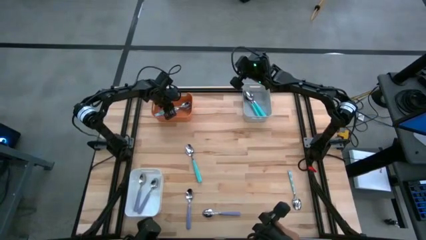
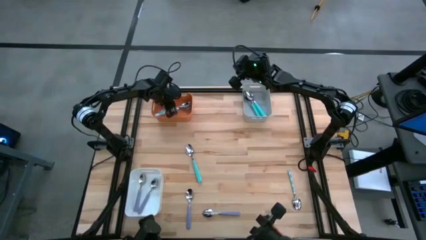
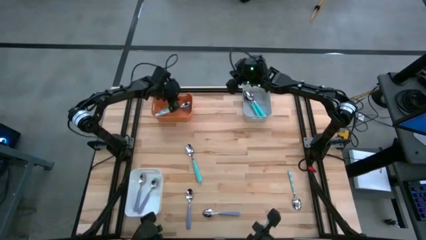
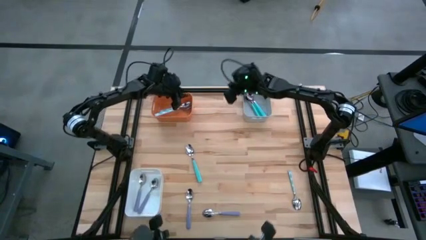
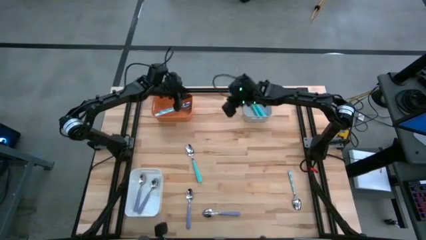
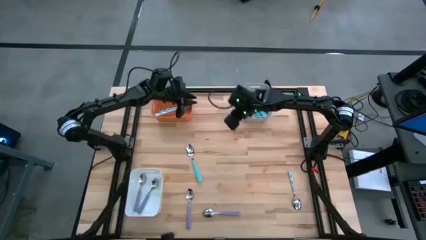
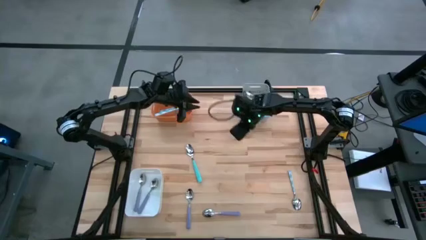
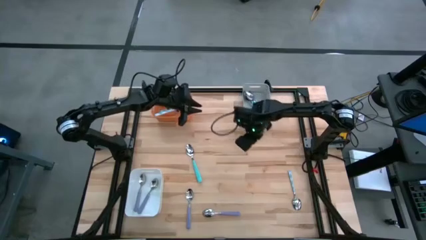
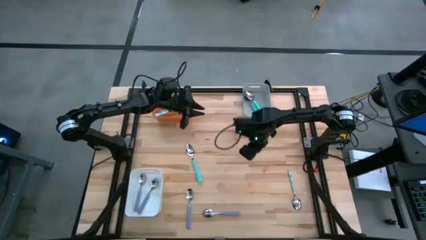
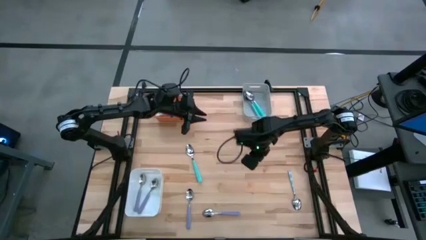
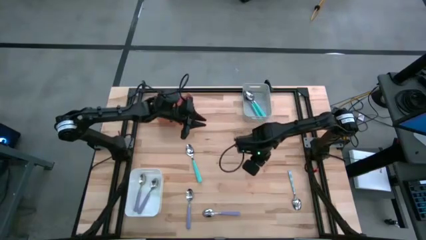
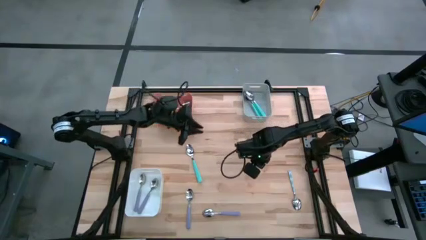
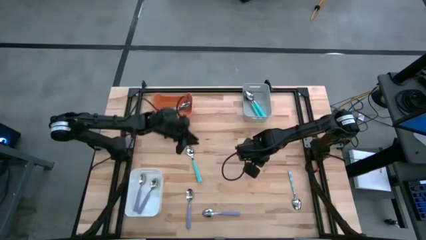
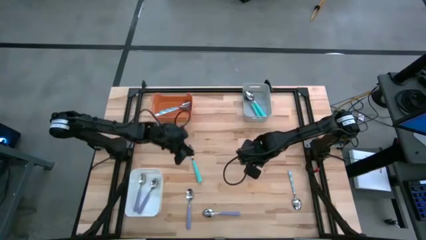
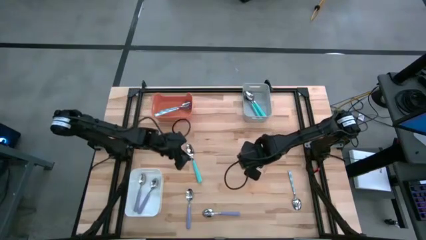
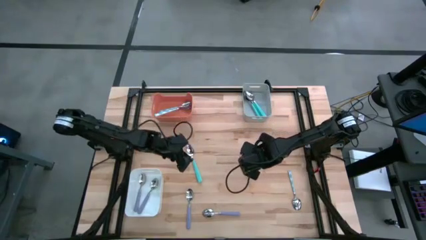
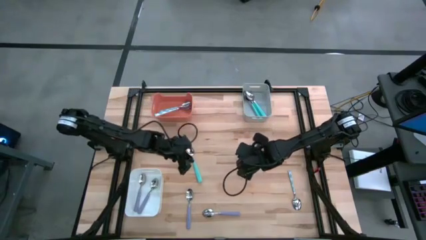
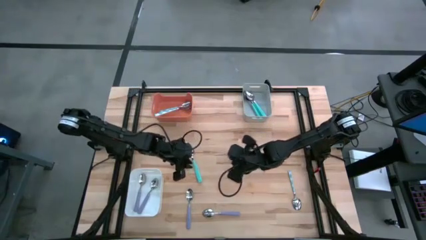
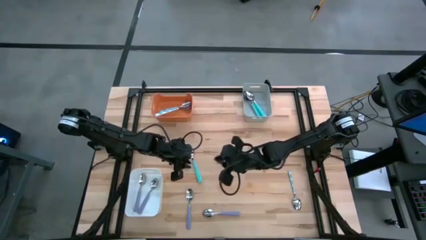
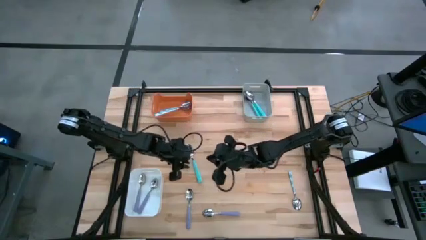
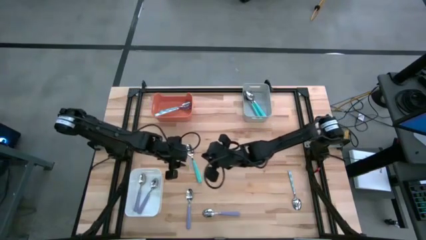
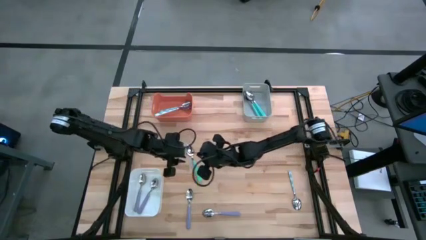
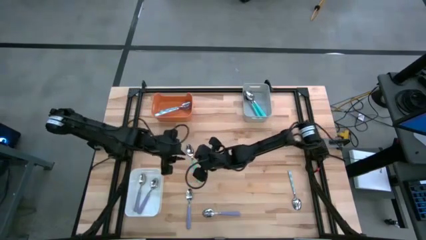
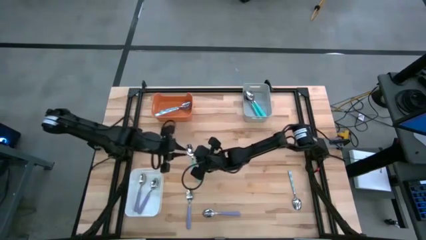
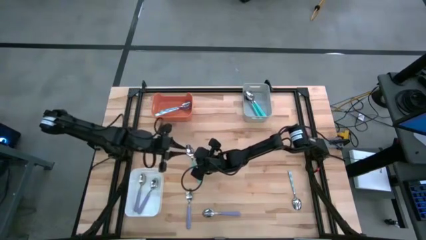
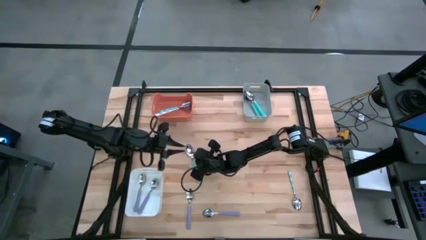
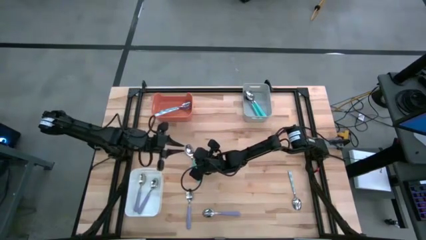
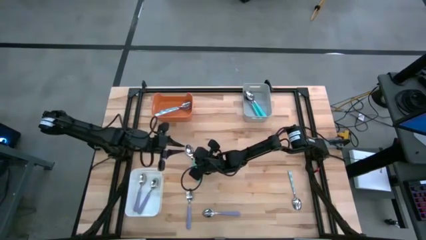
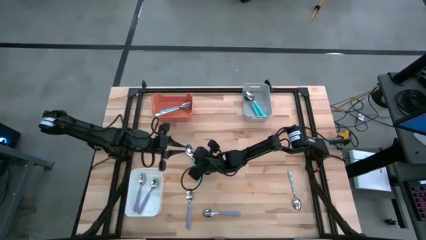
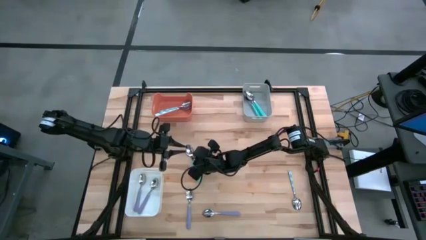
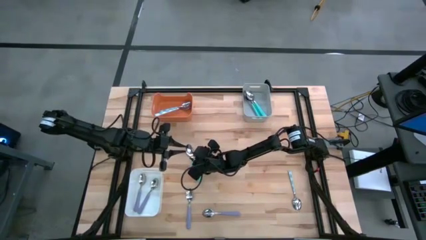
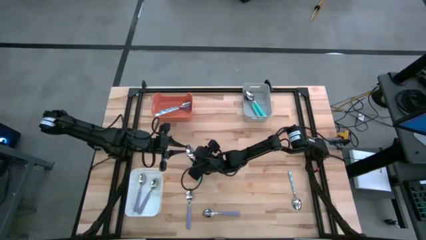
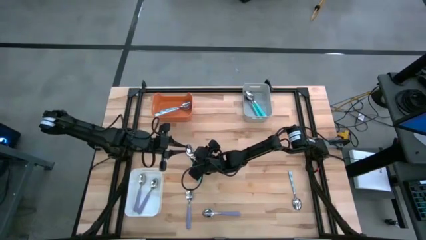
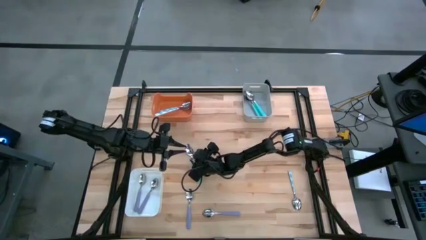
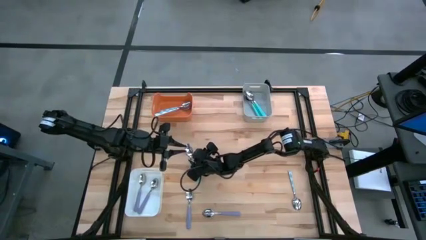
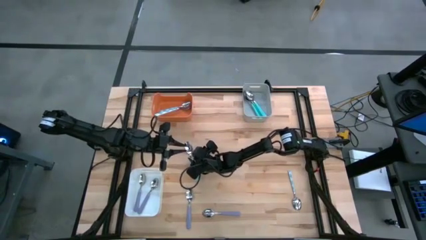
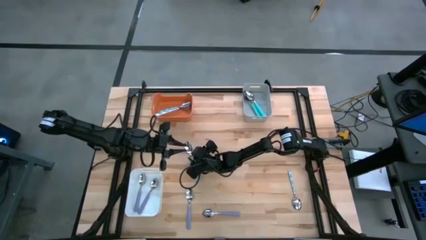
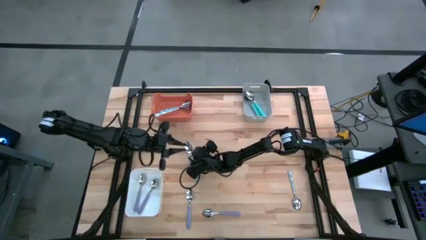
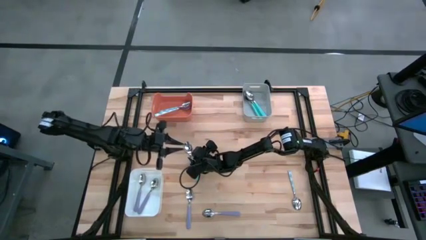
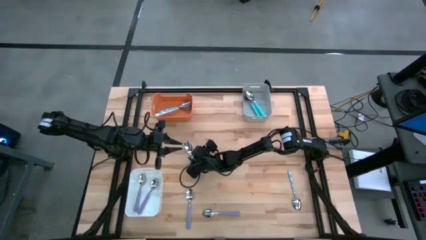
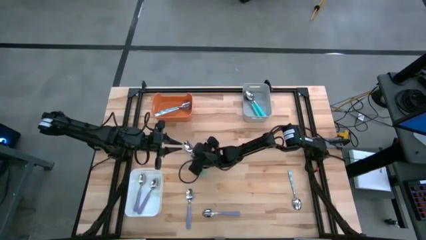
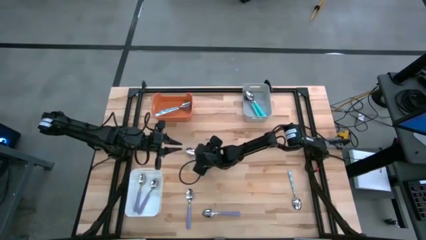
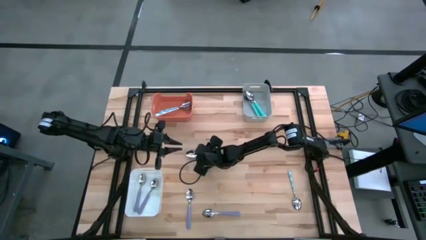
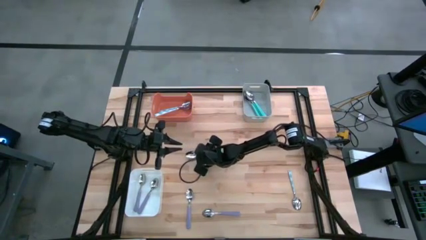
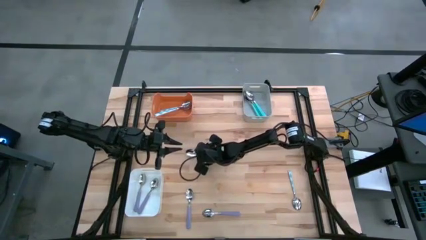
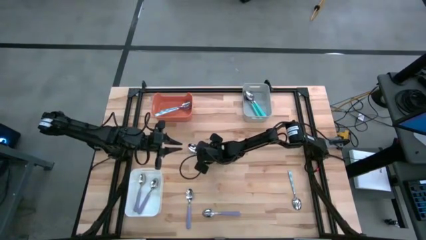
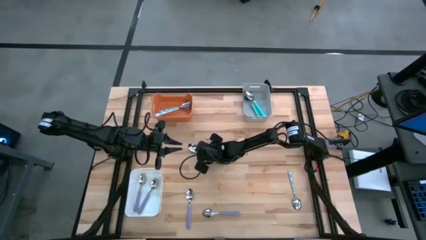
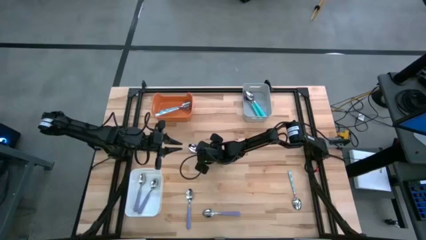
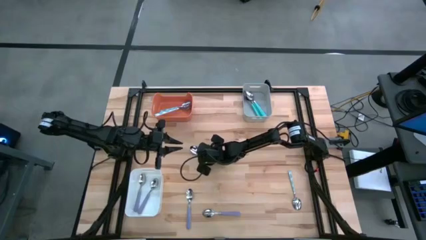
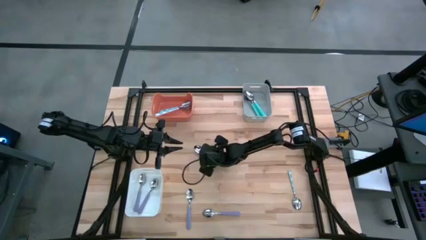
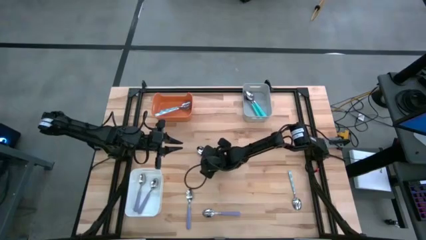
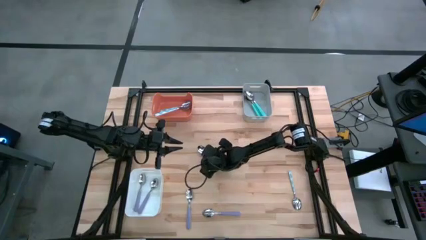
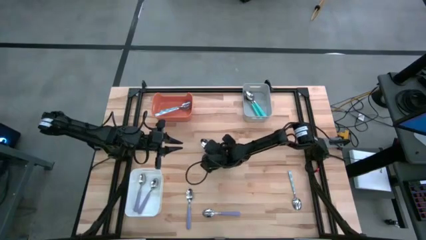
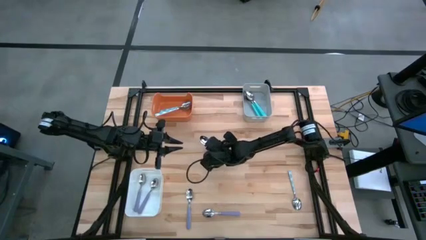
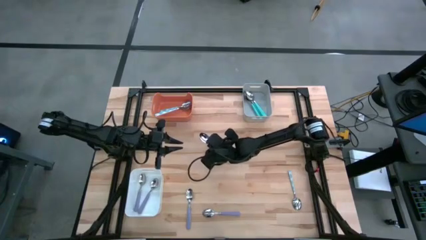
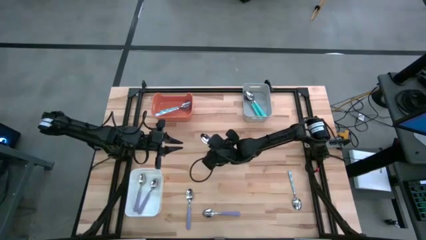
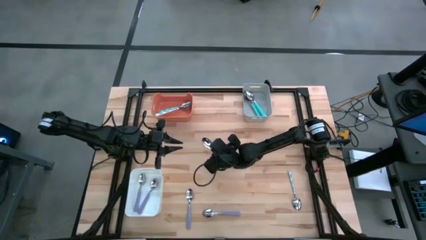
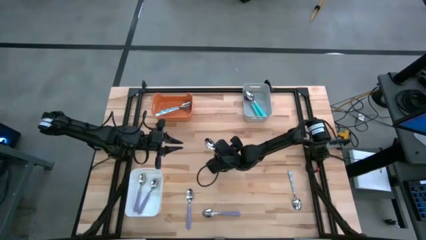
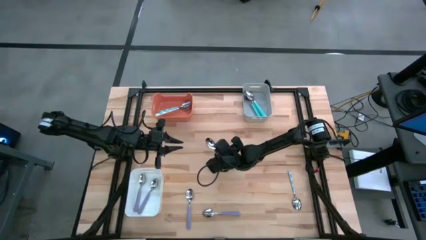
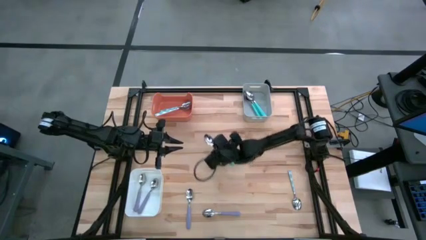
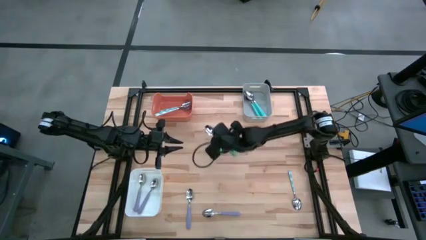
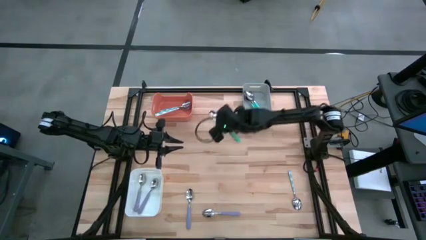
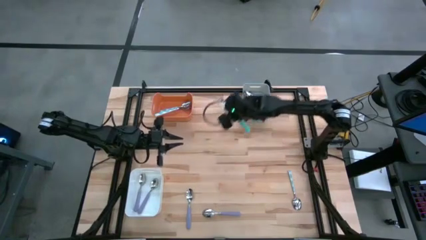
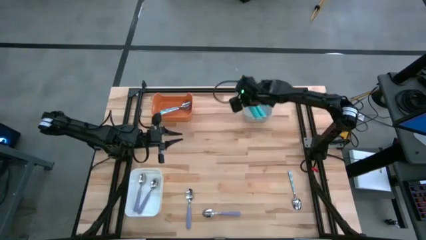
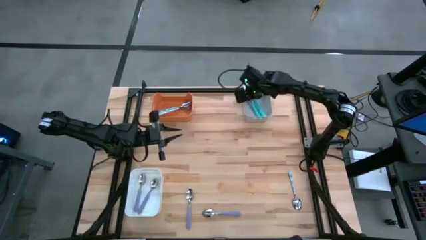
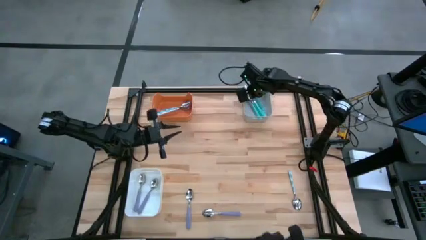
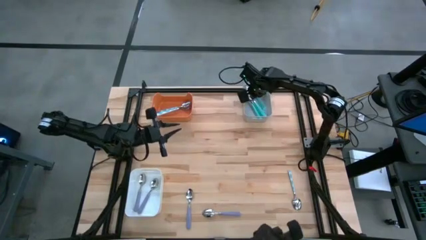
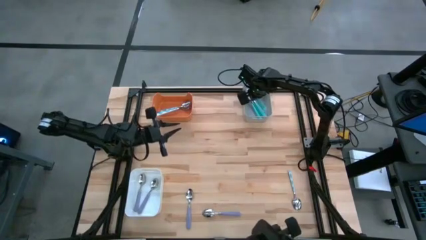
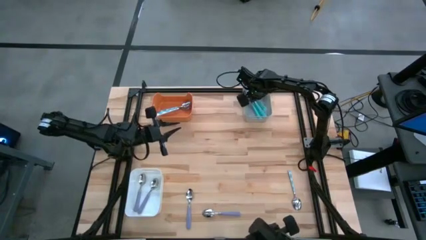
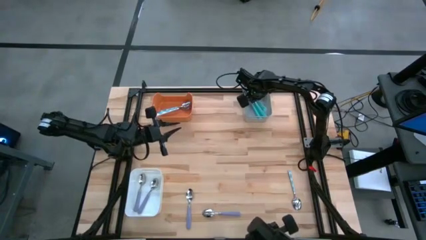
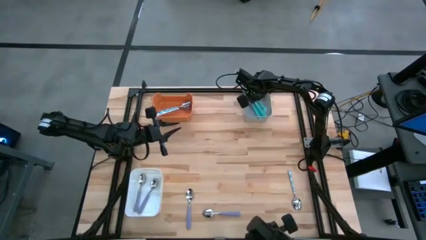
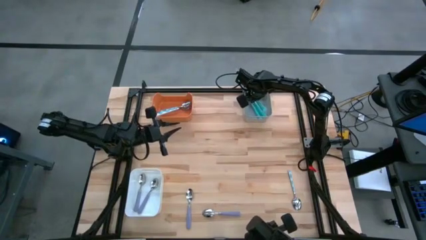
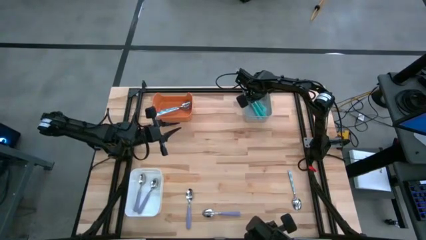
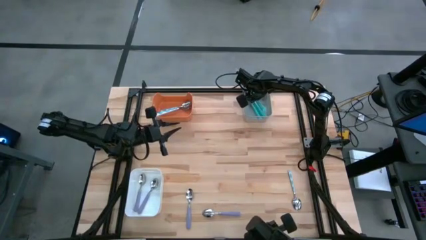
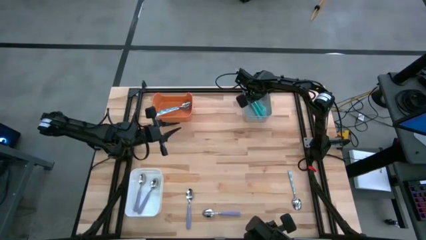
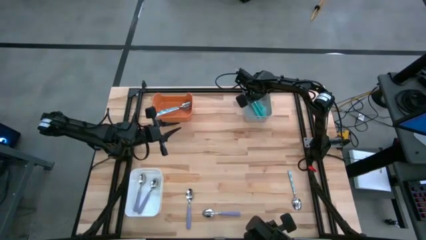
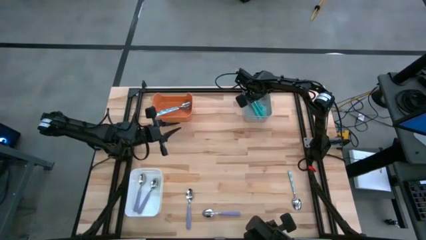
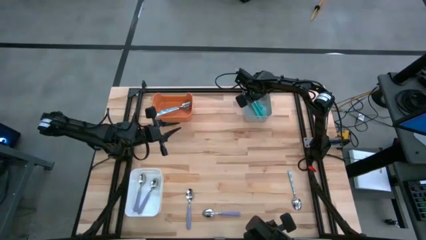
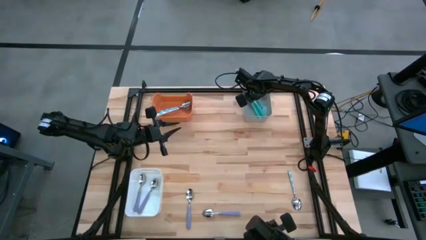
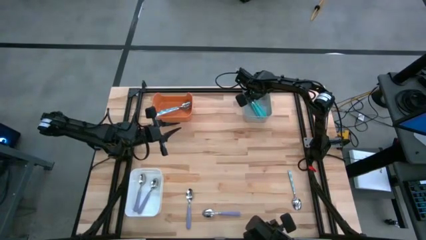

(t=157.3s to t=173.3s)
Task: Sort silverware by color (type)
Put the light blue spoon into the gray bin
